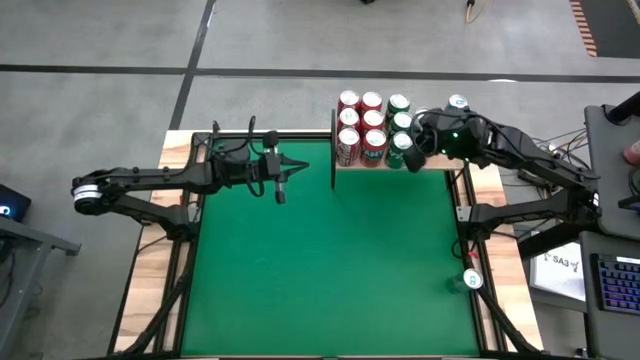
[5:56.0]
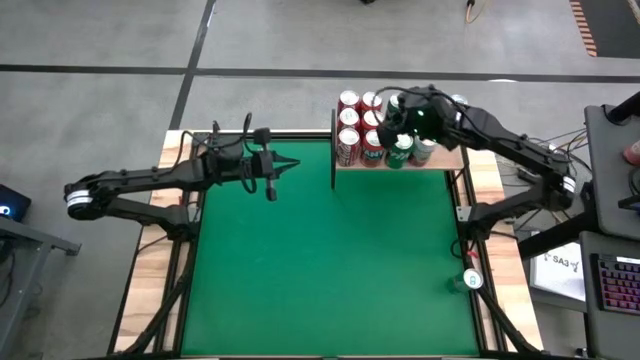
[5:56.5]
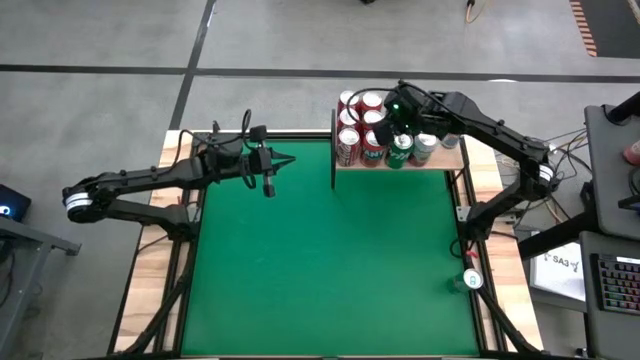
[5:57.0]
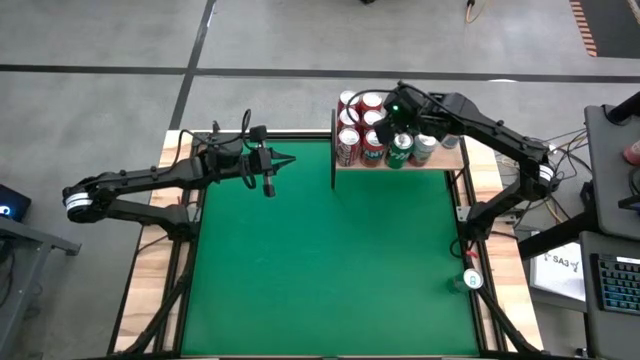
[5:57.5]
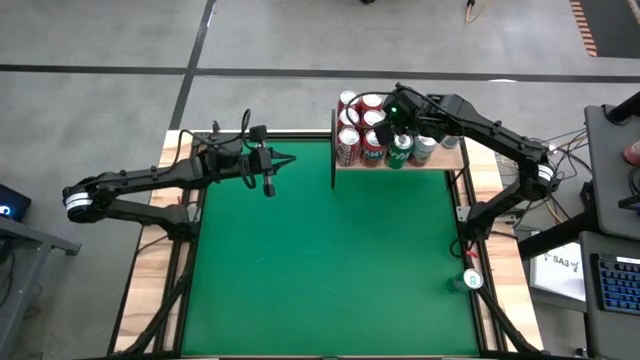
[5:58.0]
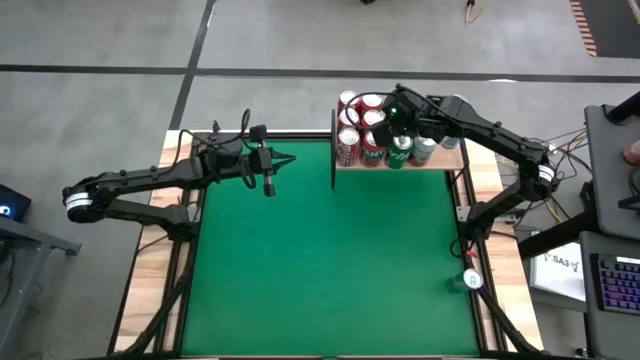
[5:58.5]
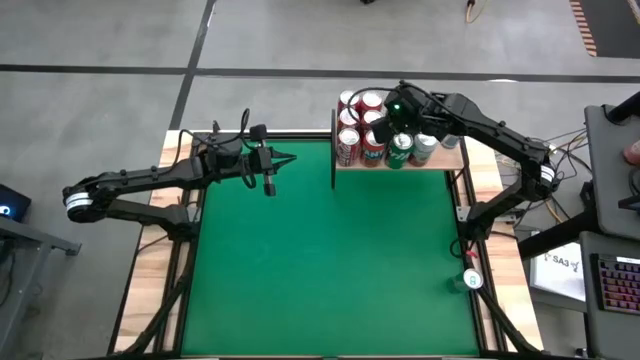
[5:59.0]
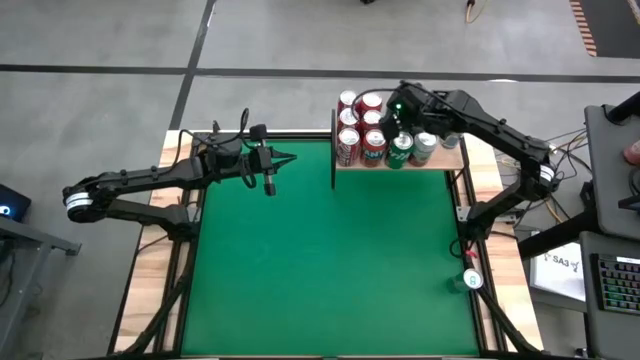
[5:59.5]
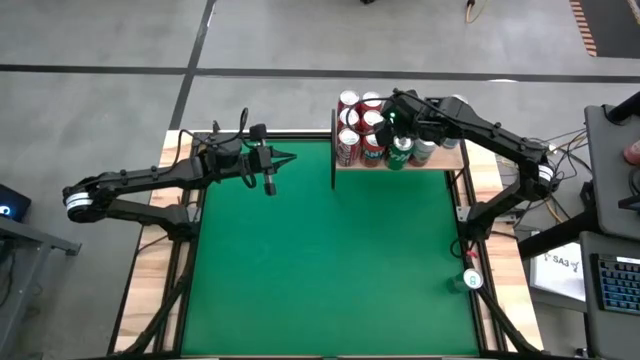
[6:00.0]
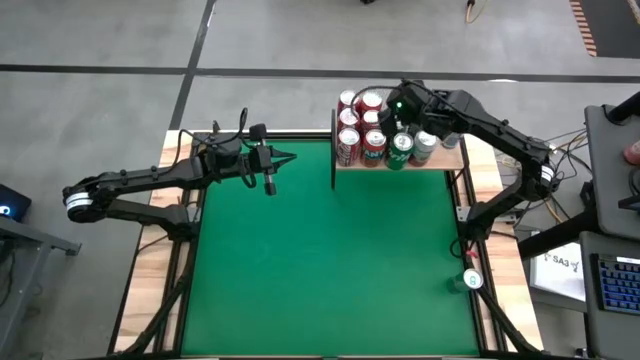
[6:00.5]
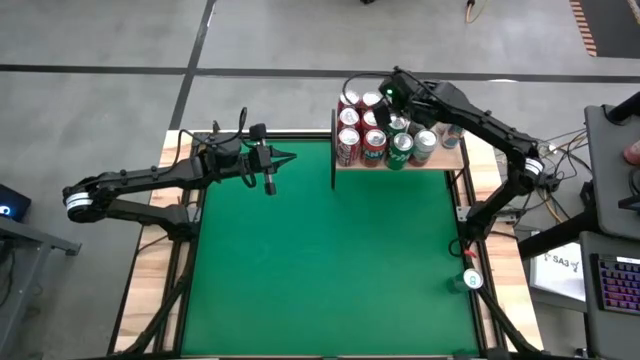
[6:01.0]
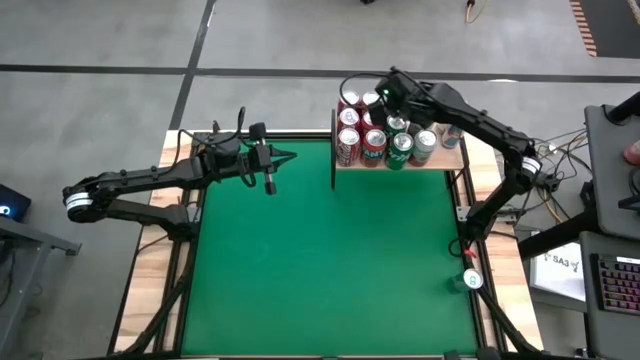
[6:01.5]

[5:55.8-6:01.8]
Task: Place canned beverage on shelf
Adjust the green soda cans on the shelf

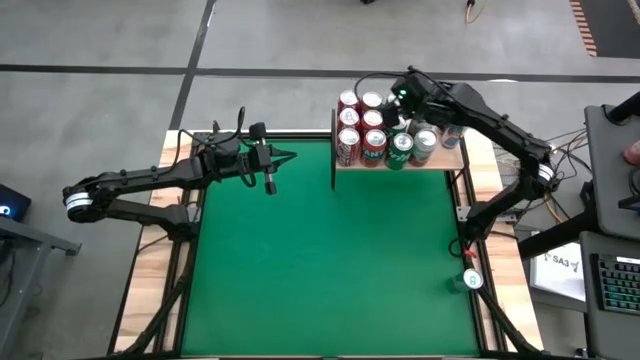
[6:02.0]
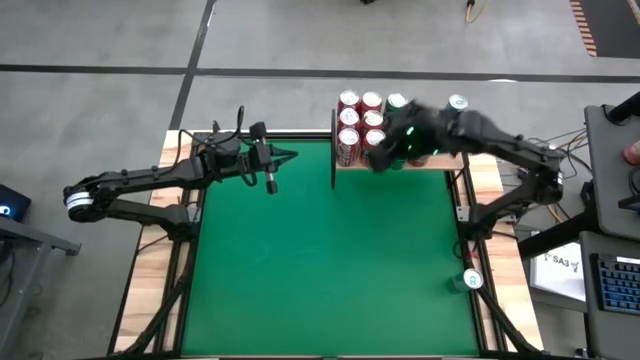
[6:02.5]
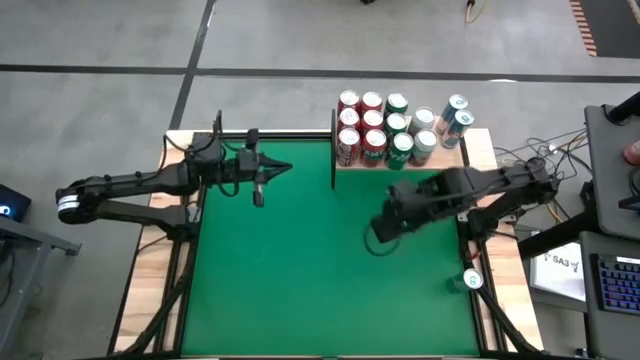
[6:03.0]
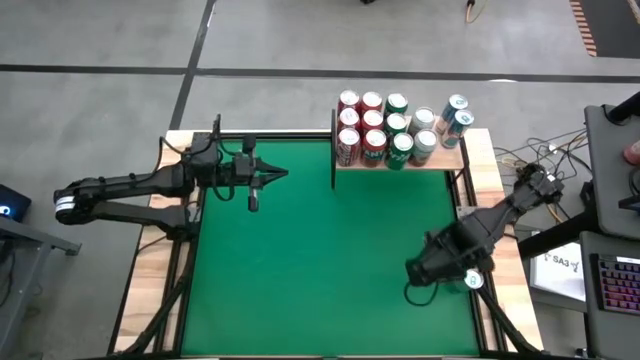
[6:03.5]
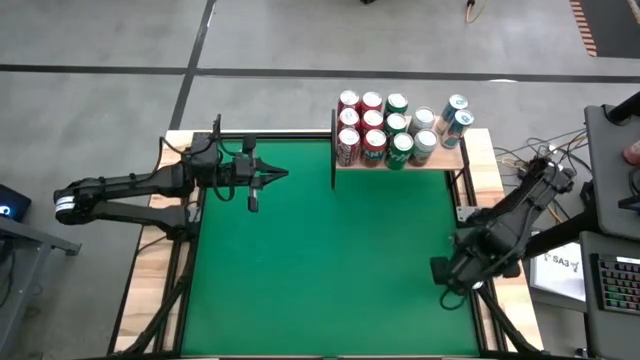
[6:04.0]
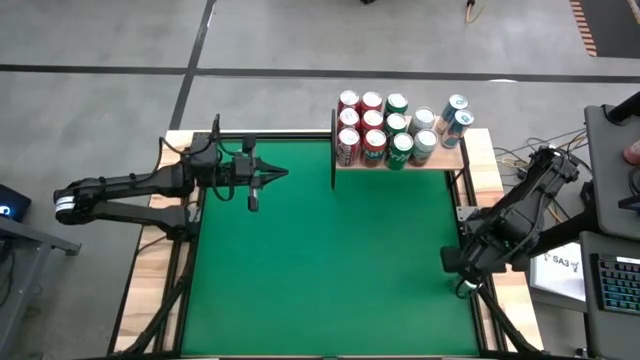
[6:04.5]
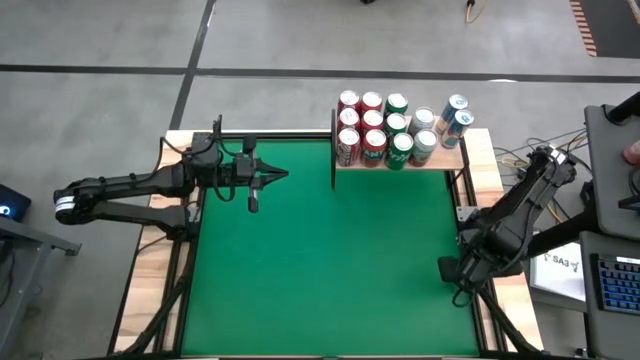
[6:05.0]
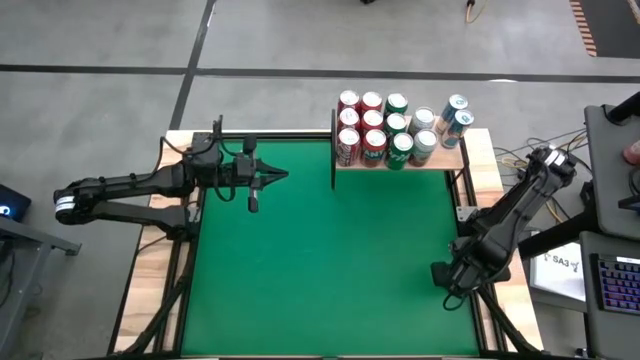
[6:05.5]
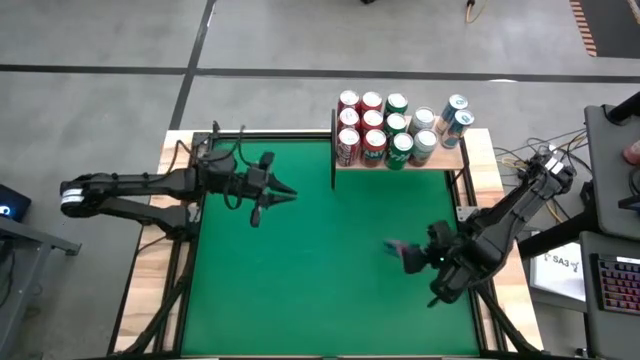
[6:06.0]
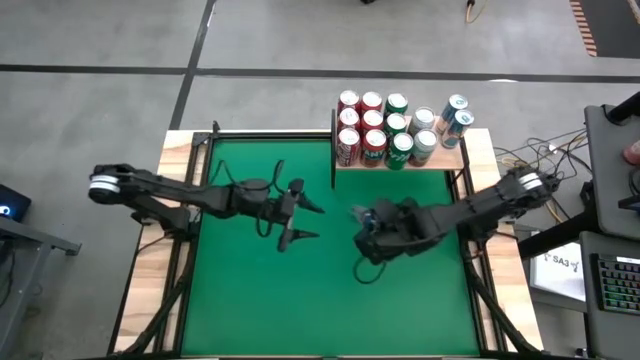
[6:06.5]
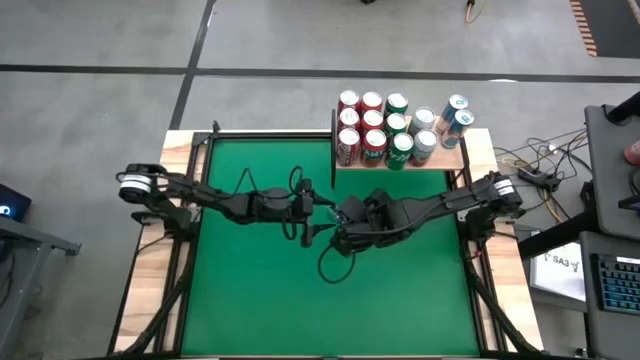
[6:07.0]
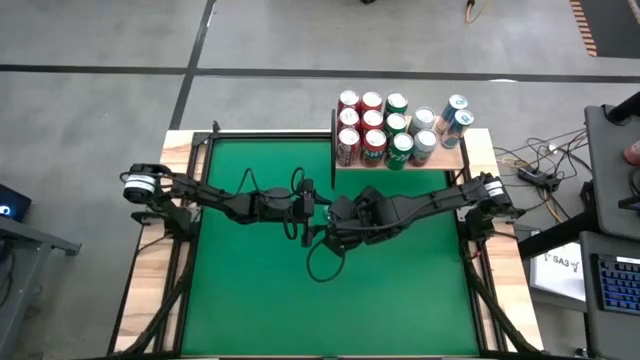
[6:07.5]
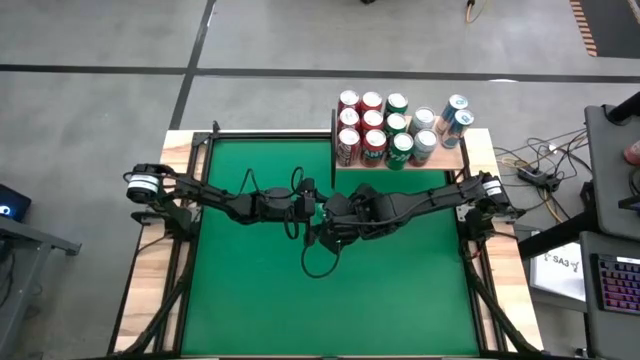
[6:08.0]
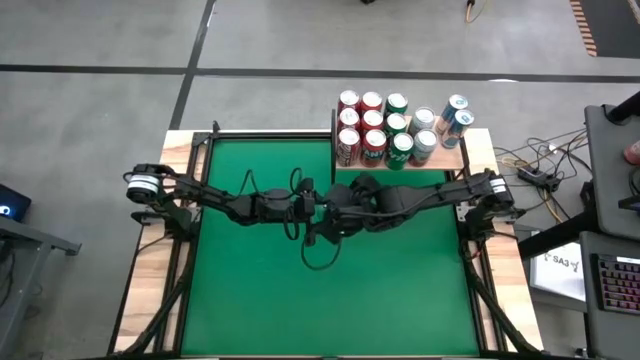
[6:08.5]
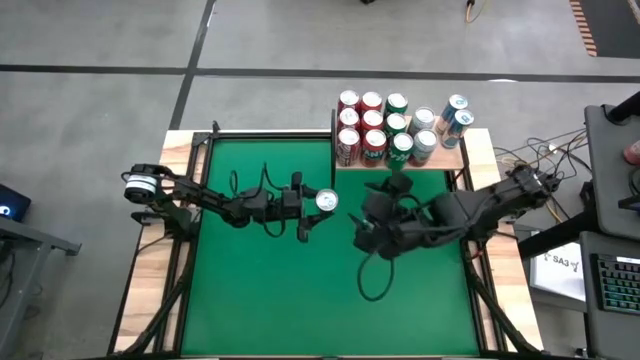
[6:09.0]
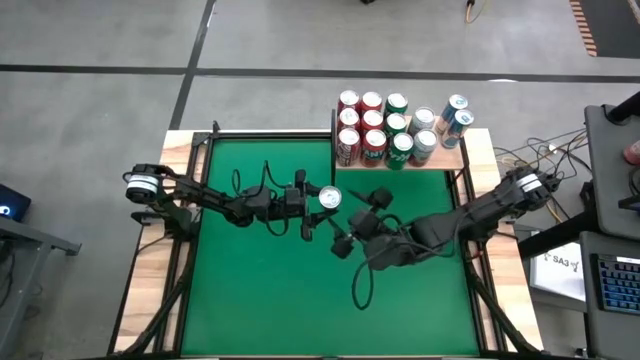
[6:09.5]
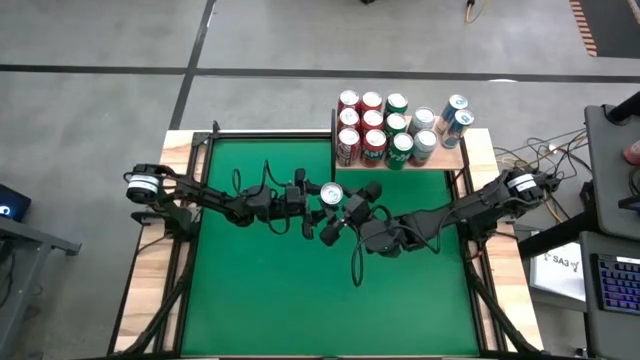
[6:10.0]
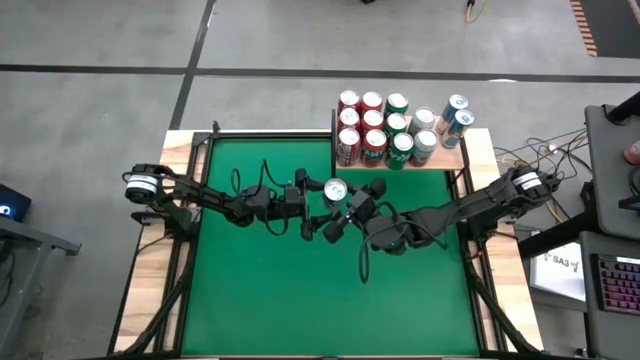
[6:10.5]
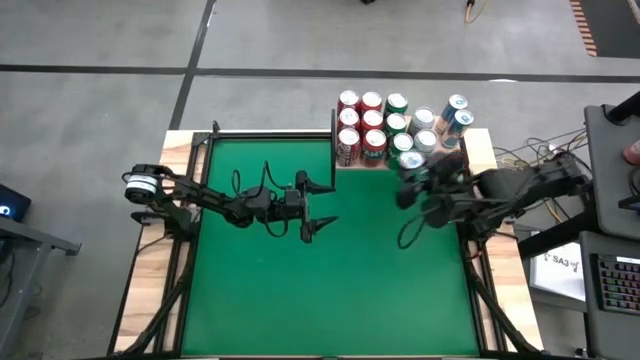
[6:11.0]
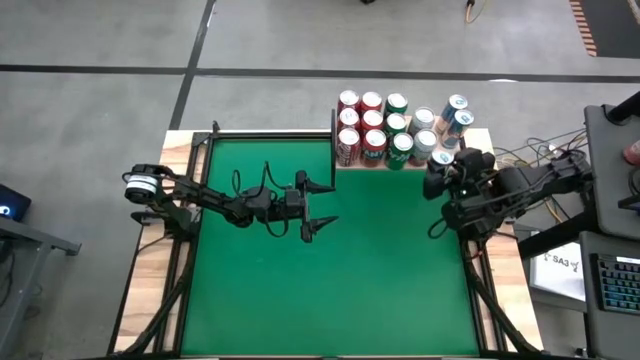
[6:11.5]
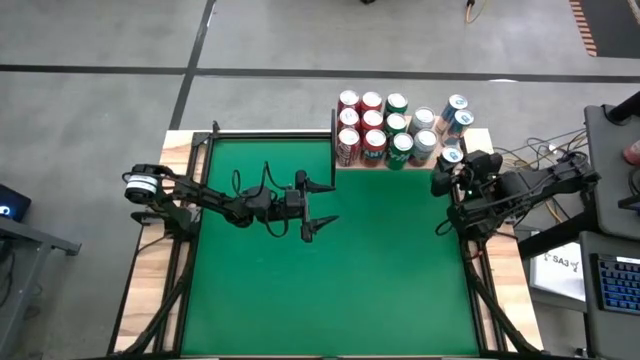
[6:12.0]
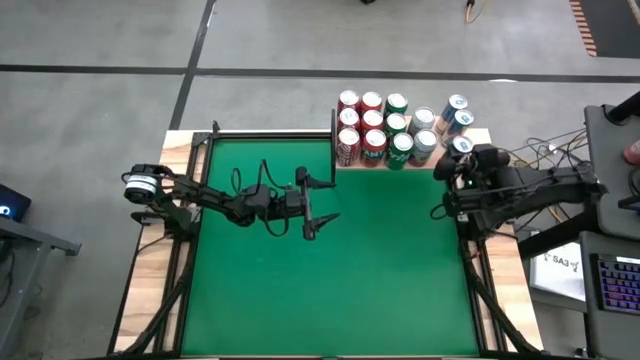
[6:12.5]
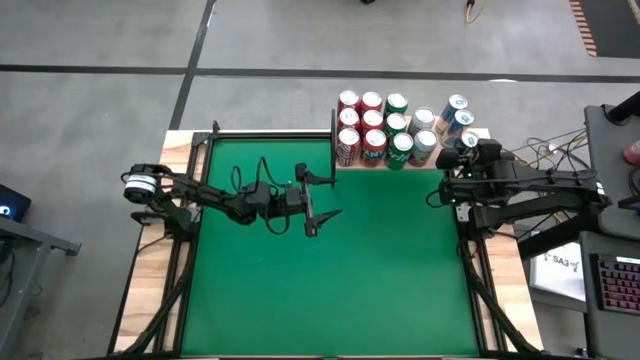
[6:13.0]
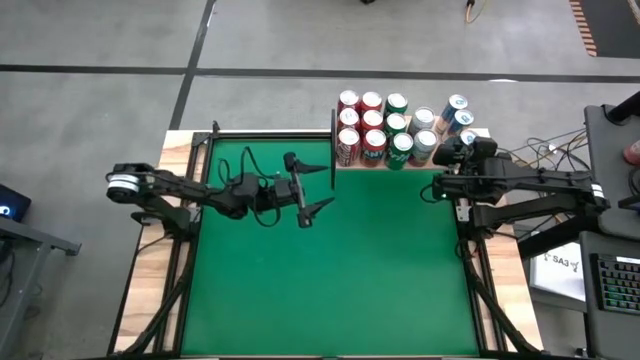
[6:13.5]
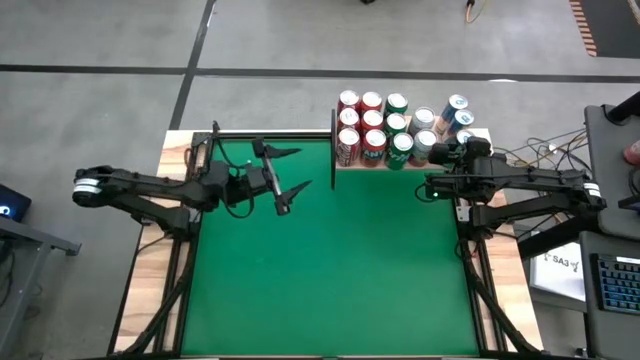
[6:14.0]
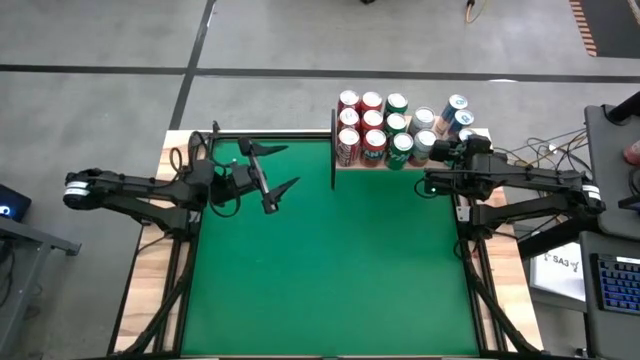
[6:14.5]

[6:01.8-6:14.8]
Put the blue soda can on the shelf aligned with the other blue soda cans

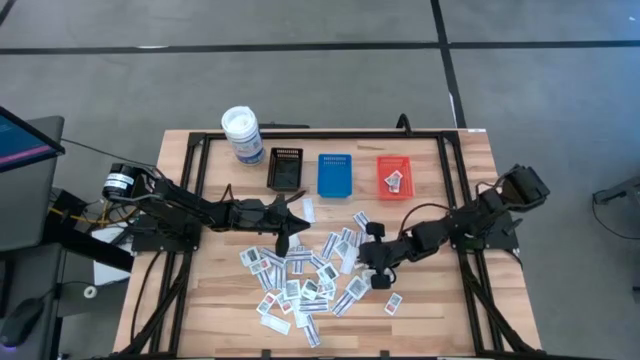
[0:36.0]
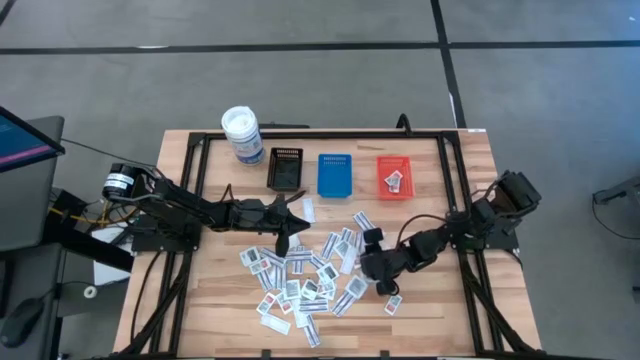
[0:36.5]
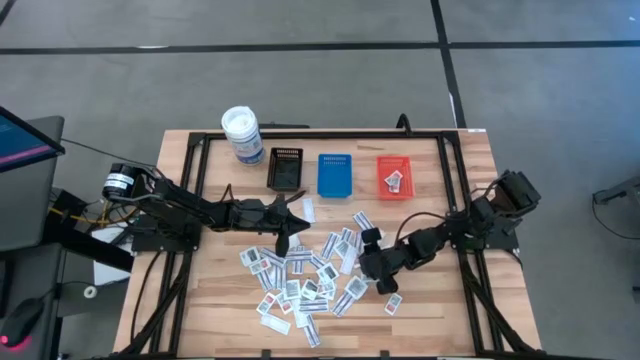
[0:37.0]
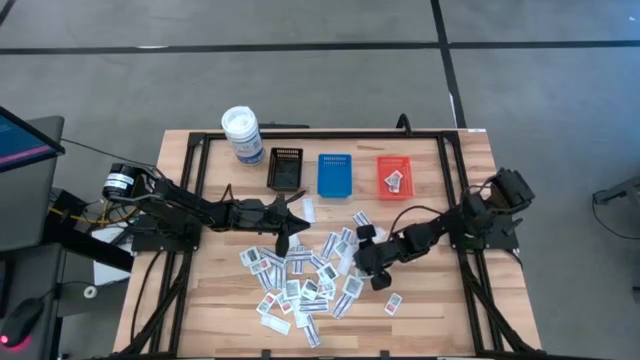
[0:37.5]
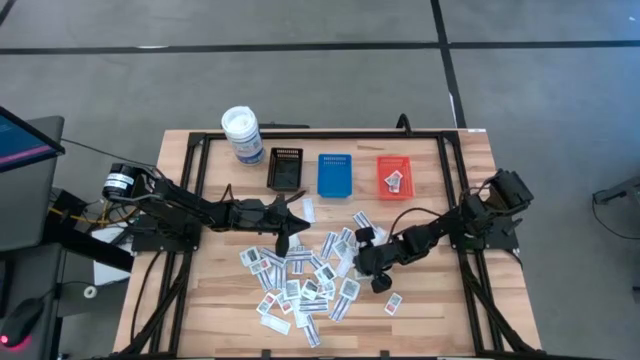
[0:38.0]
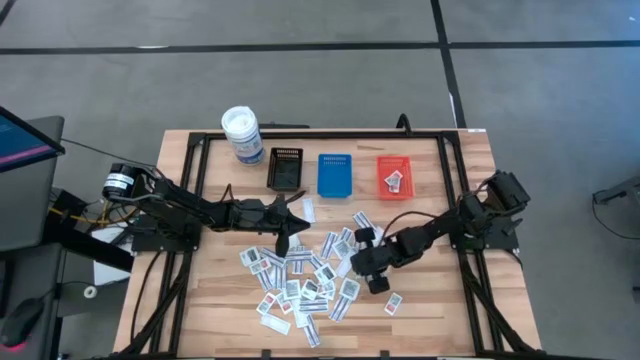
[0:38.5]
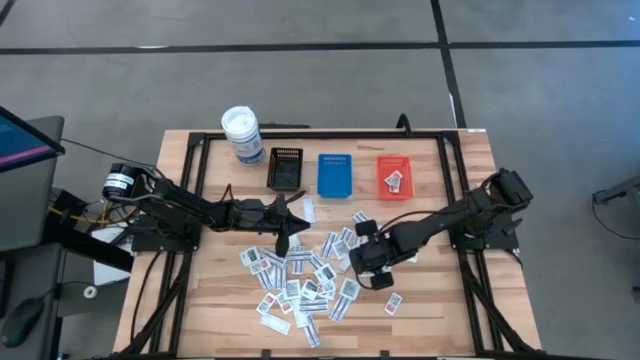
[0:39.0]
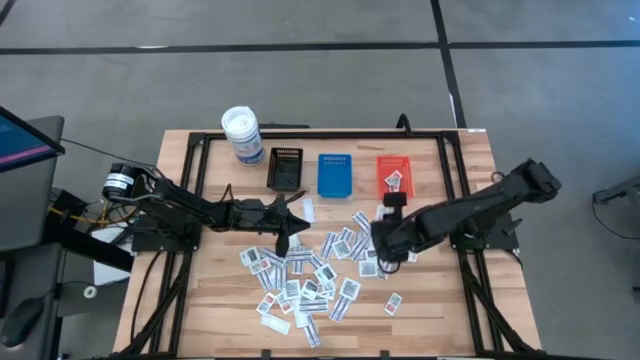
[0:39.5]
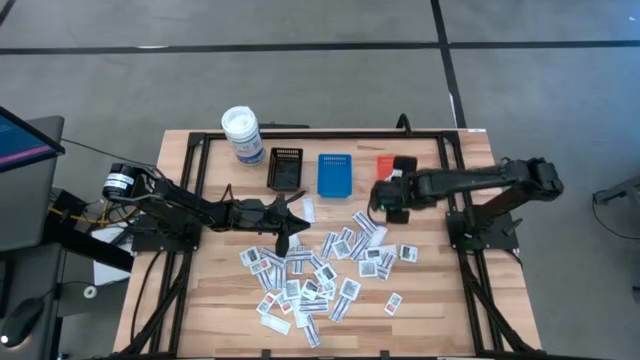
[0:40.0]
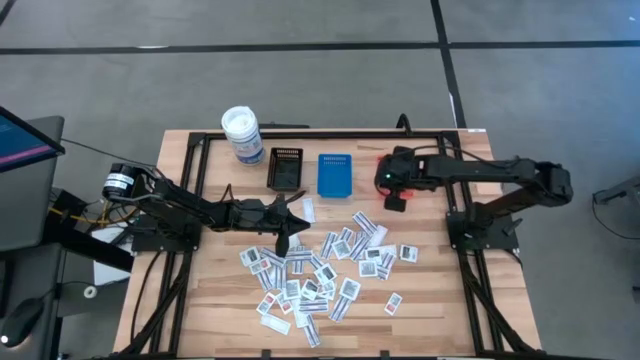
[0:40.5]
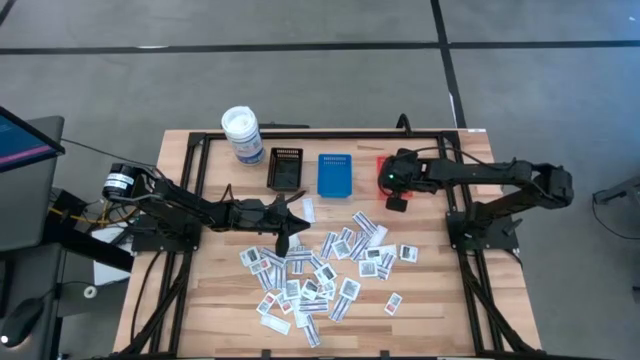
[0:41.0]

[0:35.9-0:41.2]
Task: Pick & Place First Aid Supplies
Put the orange ointment pack into the orange bin
